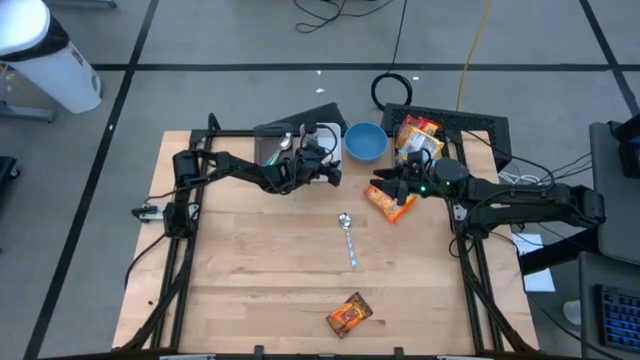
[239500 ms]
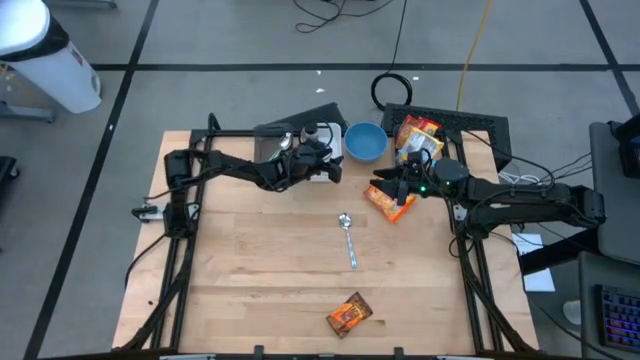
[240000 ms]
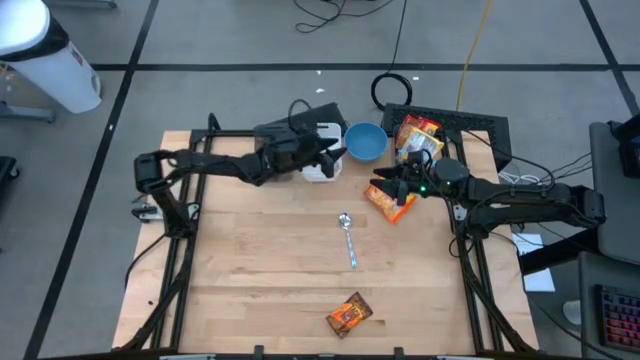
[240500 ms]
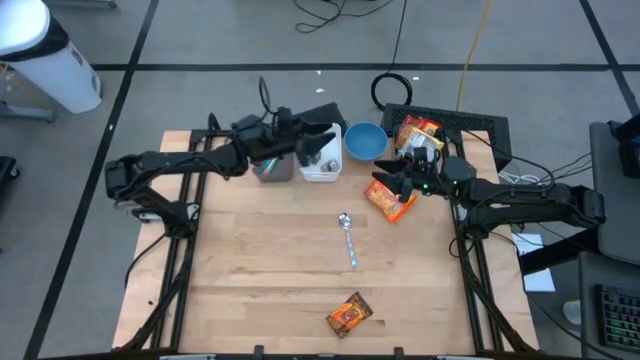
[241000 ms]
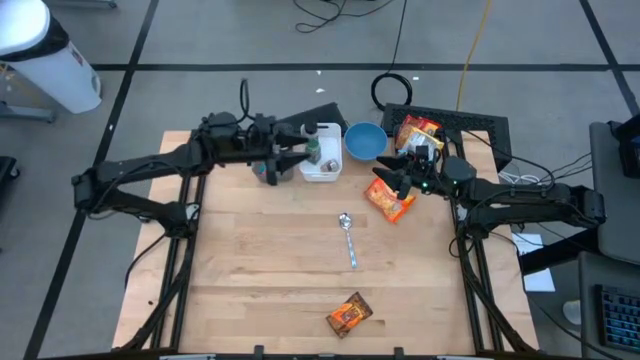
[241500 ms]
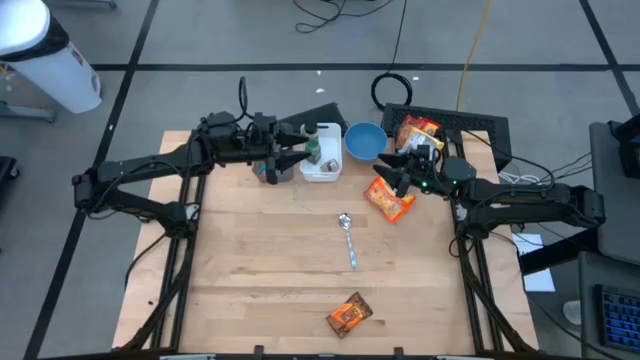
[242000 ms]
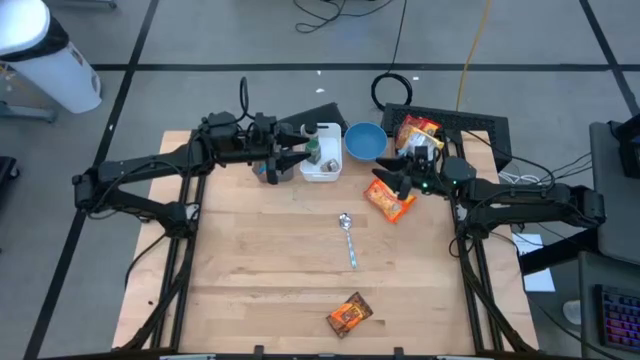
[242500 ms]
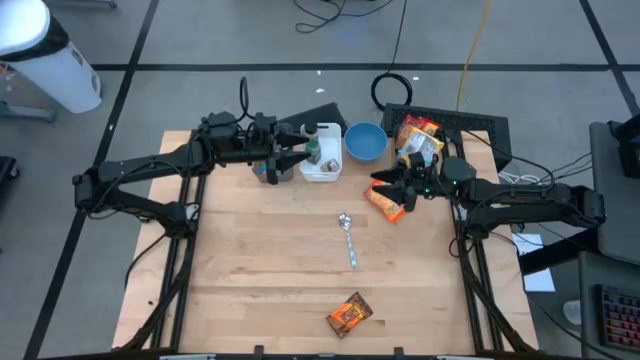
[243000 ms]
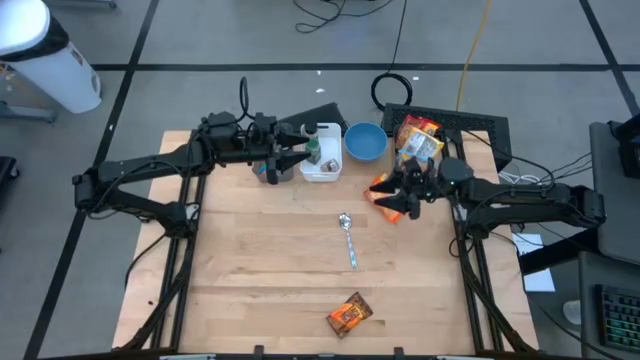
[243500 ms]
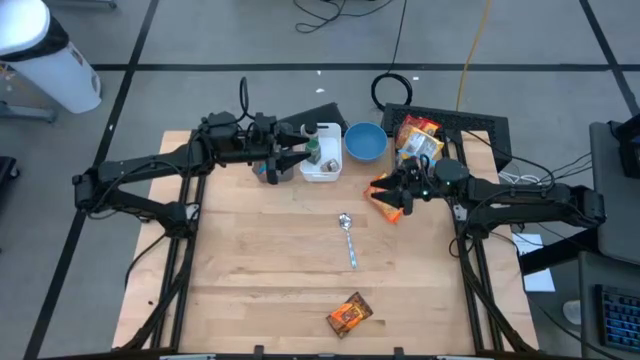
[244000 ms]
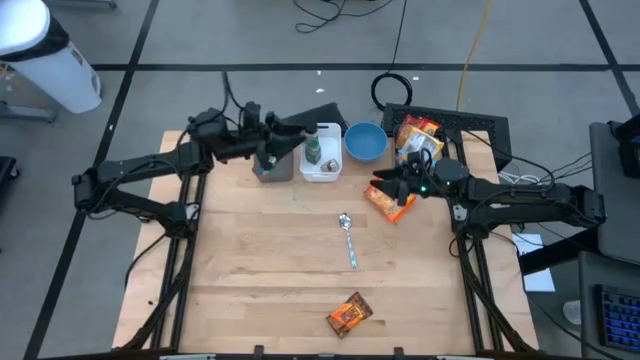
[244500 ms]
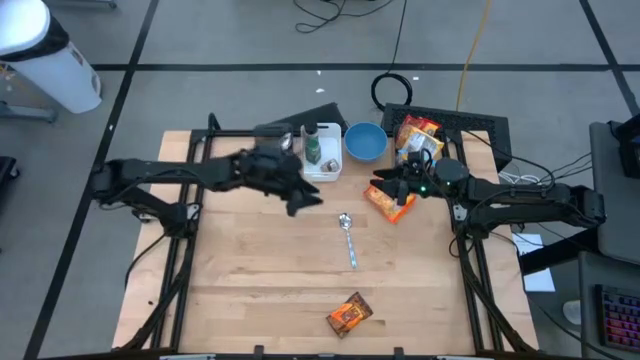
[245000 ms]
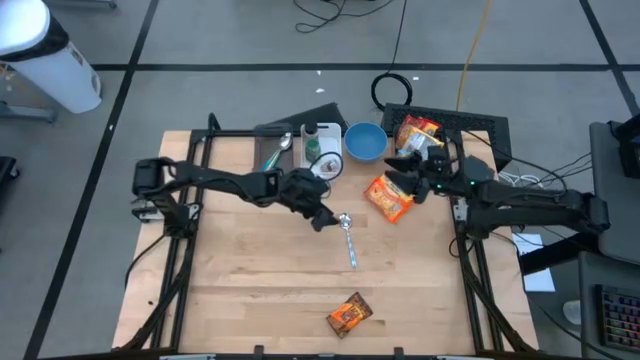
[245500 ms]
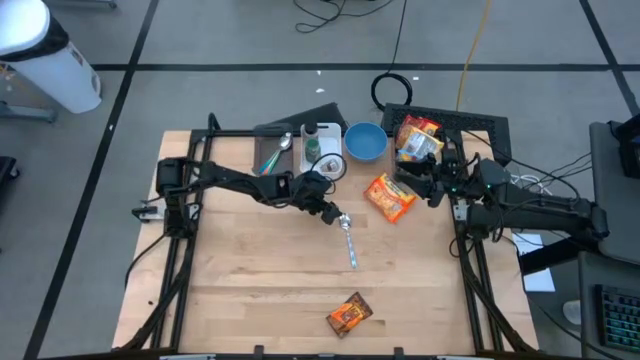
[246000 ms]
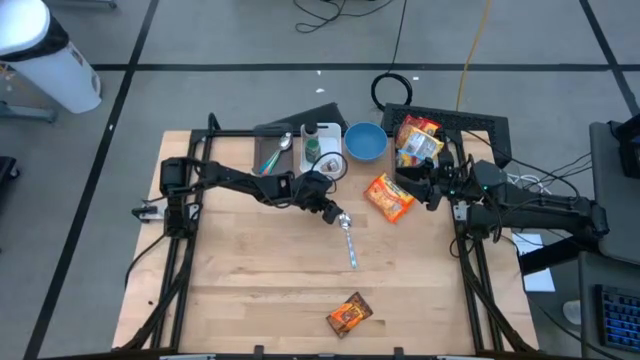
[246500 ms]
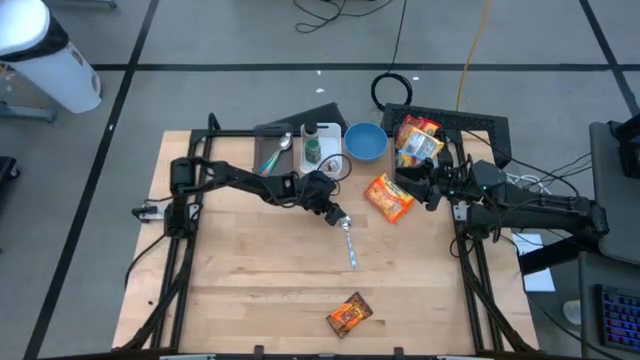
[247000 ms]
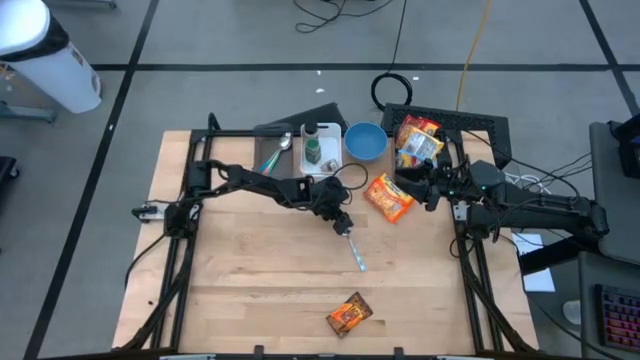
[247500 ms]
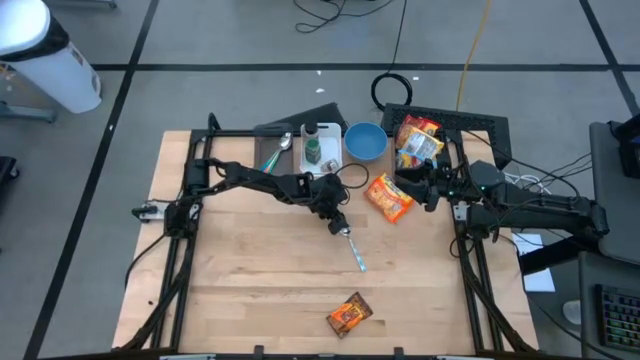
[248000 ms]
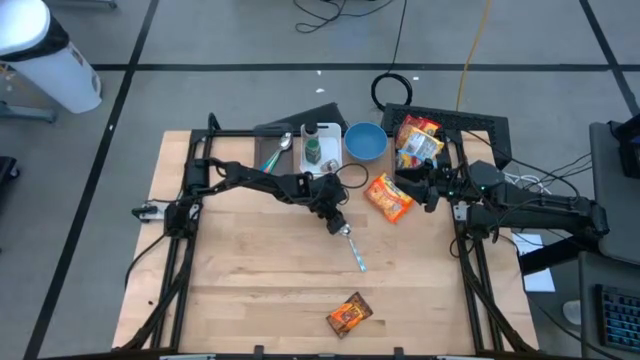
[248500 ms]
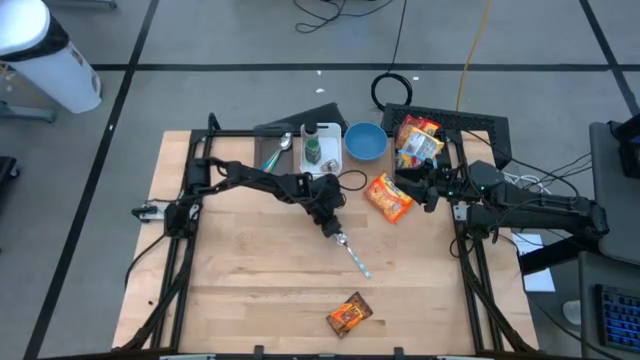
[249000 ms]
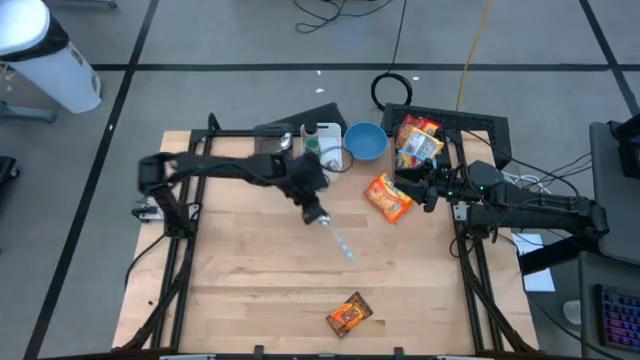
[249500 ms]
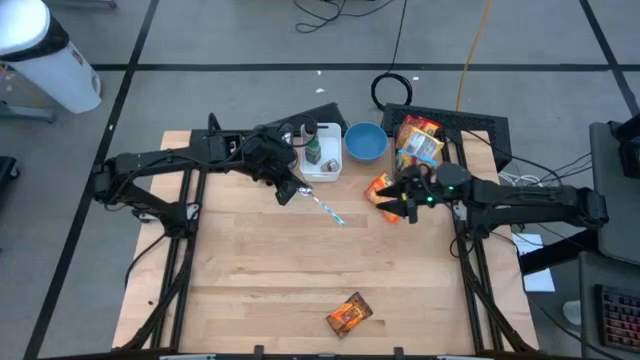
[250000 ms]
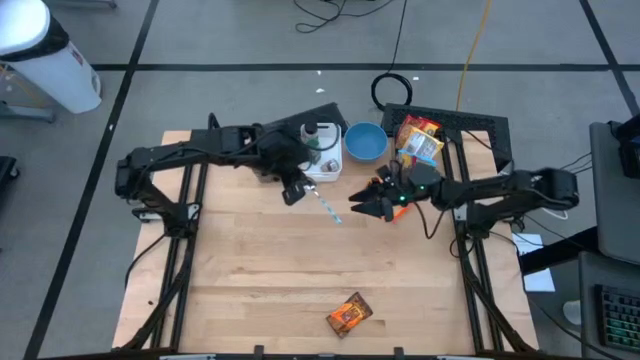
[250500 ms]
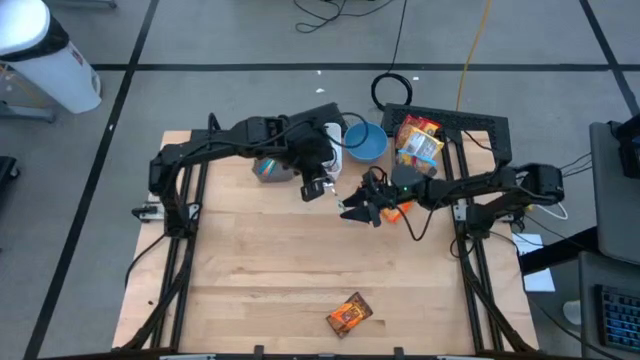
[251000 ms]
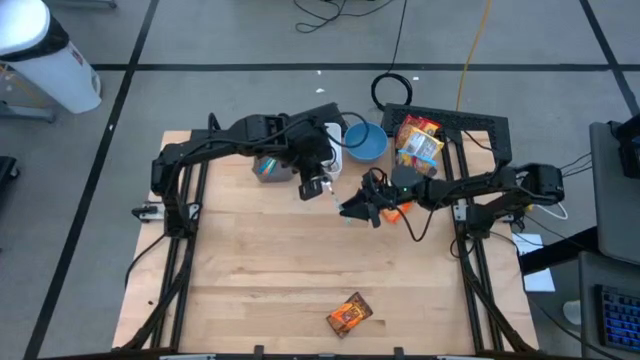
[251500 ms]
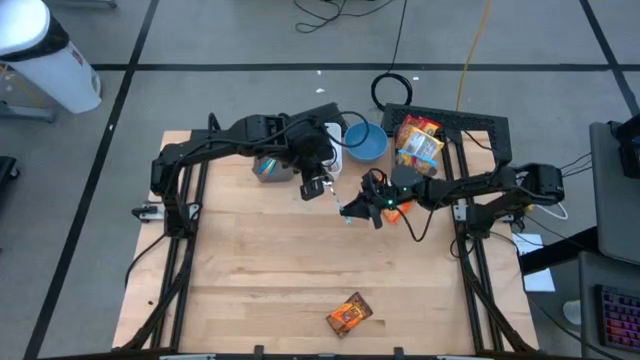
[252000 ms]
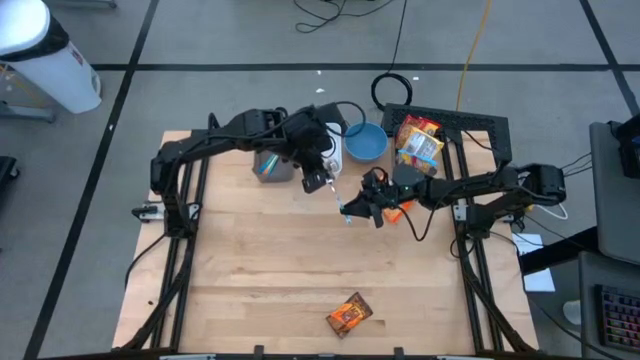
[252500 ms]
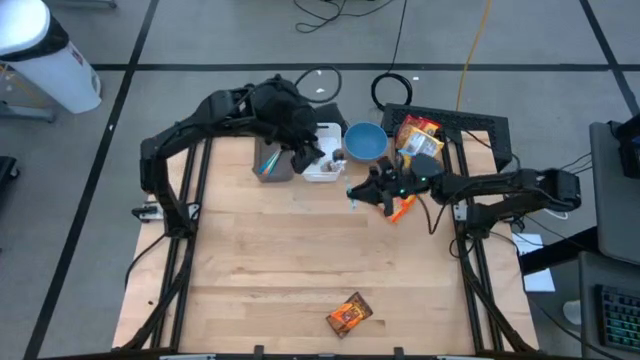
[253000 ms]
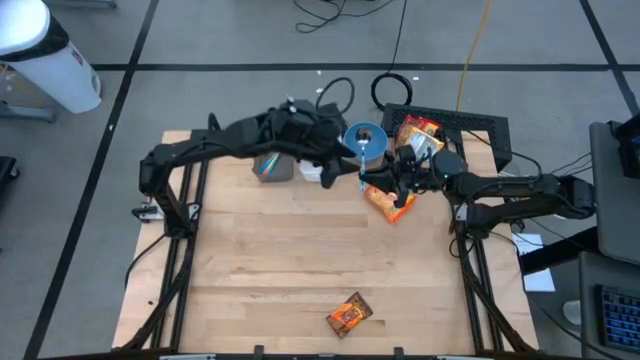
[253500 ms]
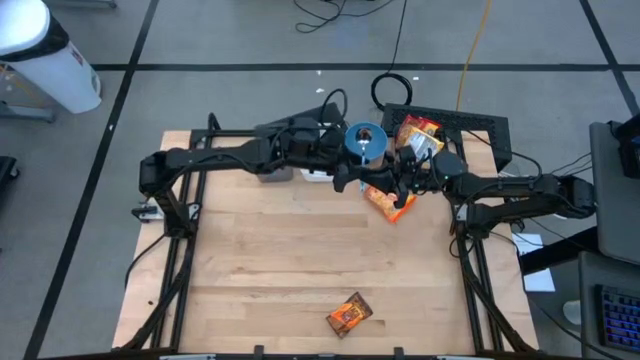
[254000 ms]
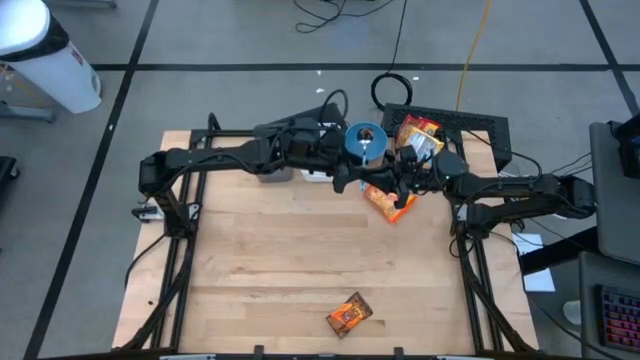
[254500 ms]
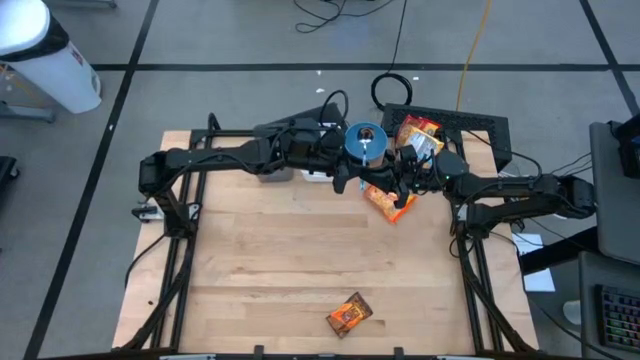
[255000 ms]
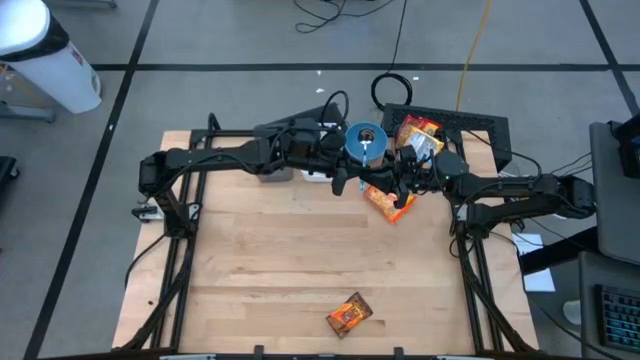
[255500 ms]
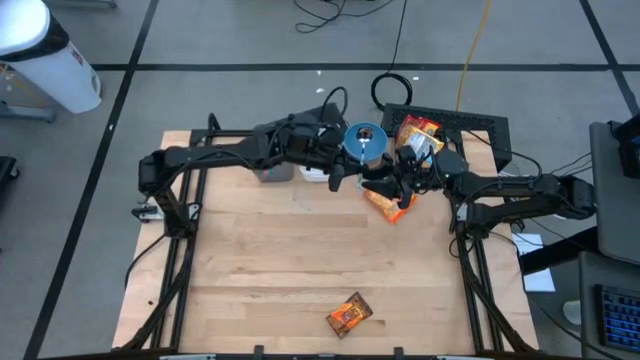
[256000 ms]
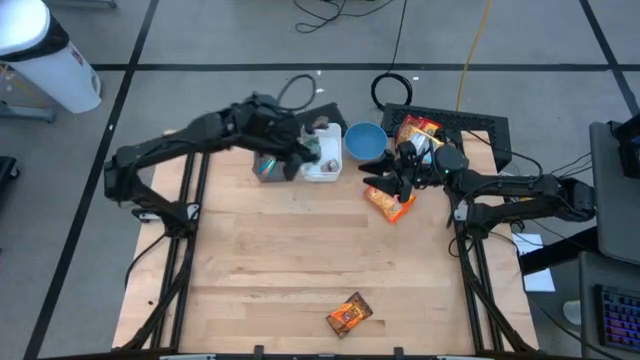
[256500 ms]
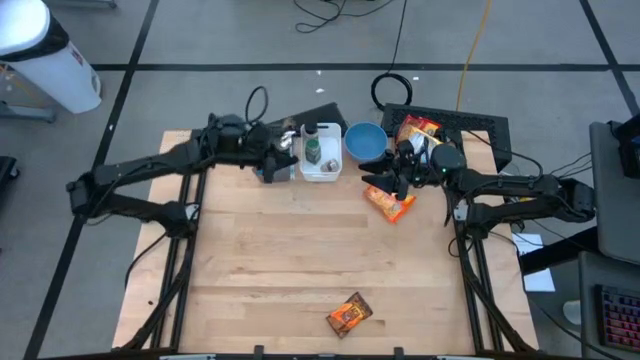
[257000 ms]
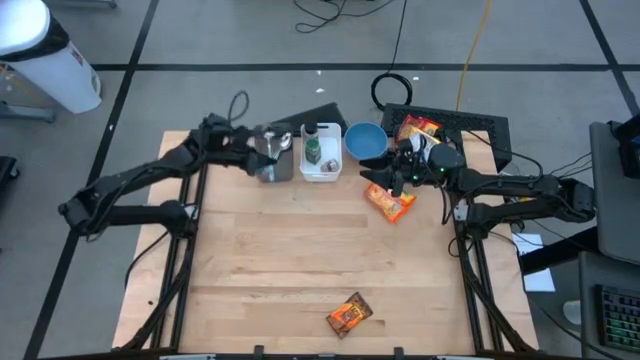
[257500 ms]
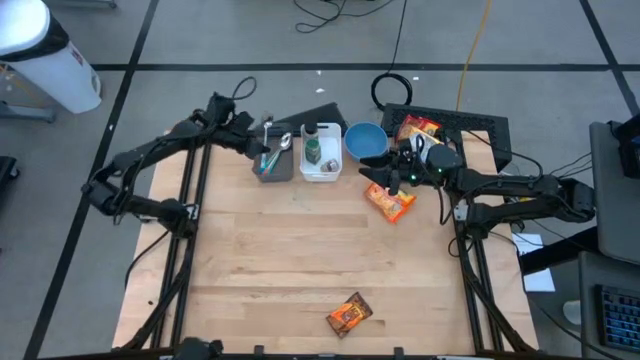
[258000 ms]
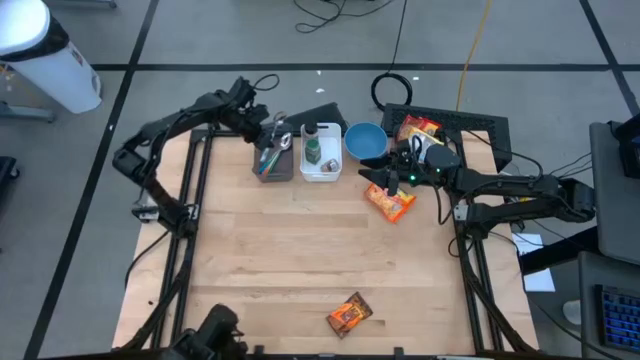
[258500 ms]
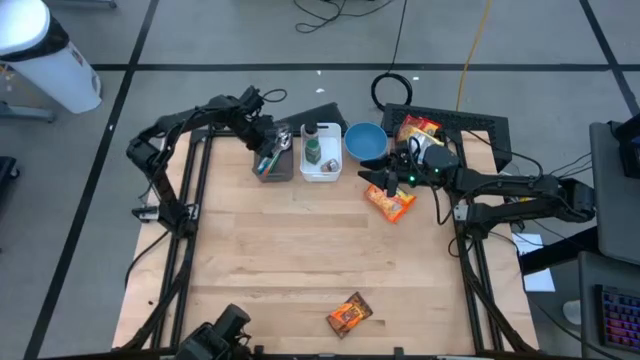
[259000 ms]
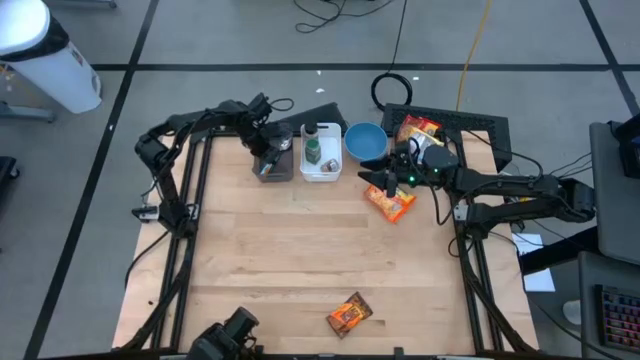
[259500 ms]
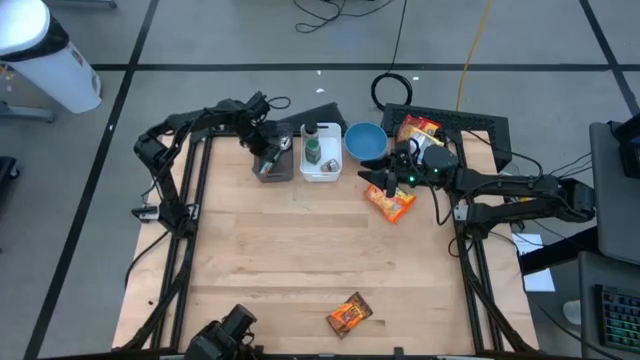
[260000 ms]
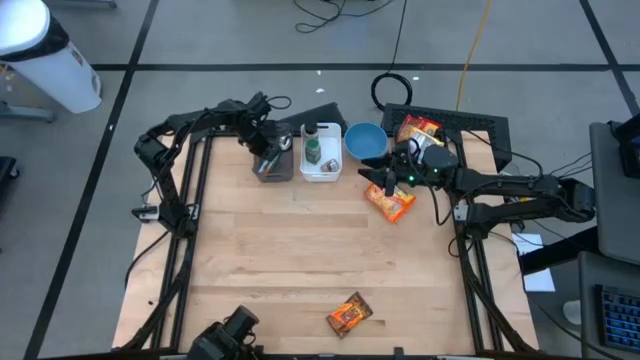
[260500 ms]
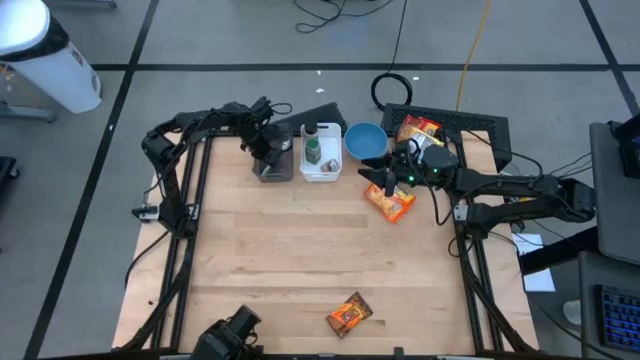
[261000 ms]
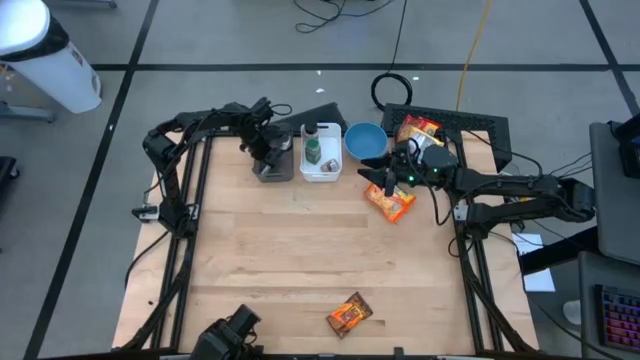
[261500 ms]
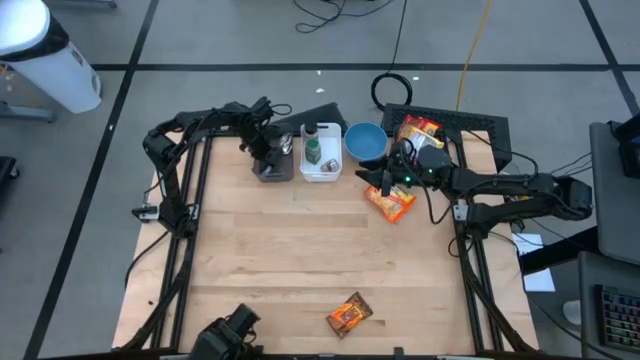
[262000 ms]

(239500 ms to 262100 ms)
Task: Pick & Place Food Item
Put the blue patterned spoon into the left black bin
